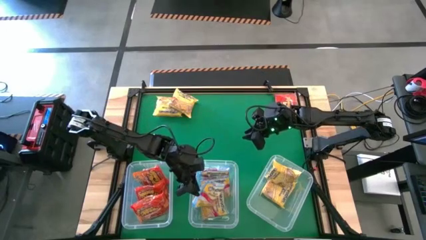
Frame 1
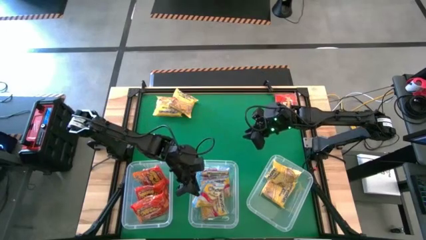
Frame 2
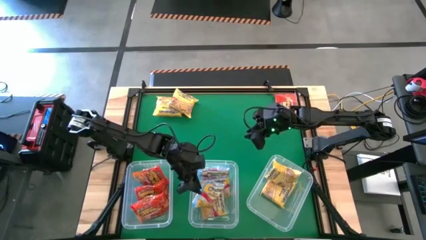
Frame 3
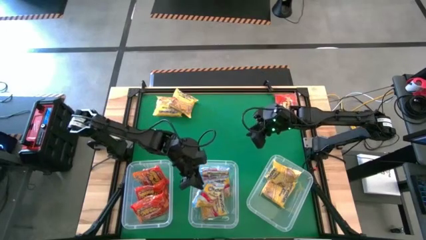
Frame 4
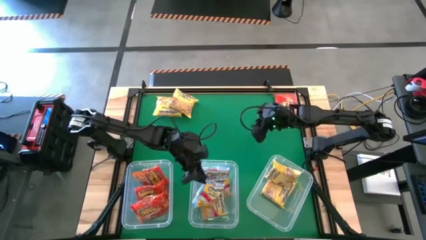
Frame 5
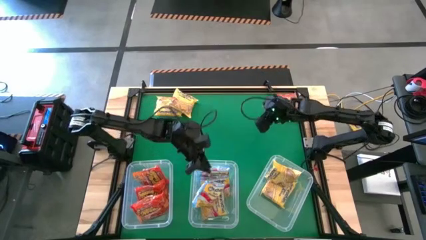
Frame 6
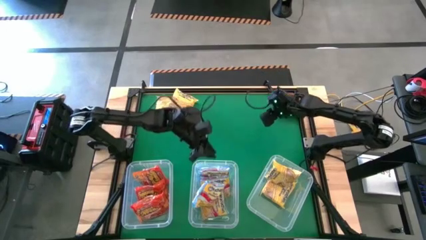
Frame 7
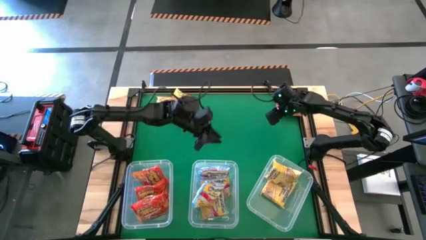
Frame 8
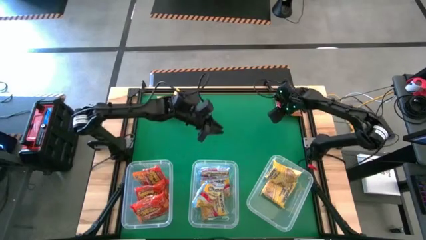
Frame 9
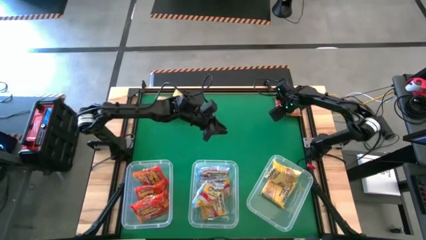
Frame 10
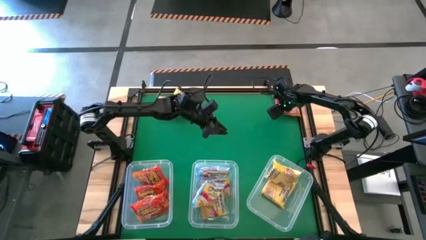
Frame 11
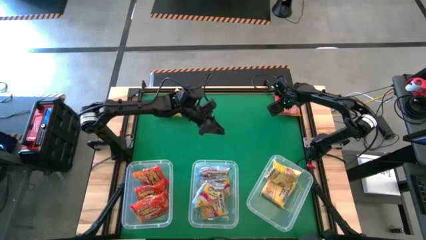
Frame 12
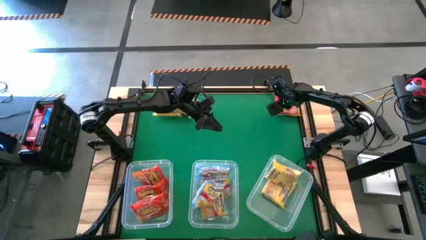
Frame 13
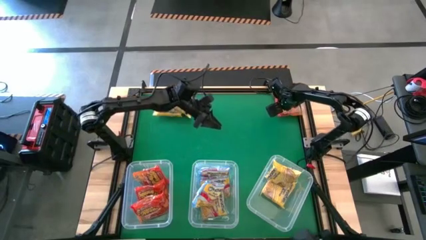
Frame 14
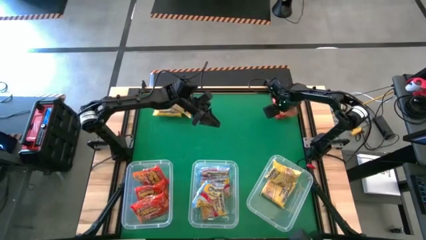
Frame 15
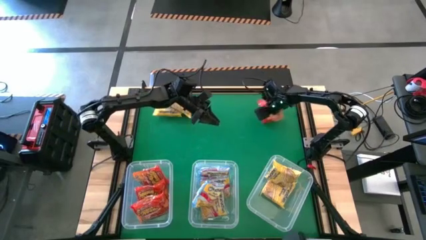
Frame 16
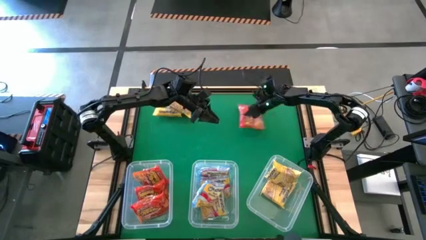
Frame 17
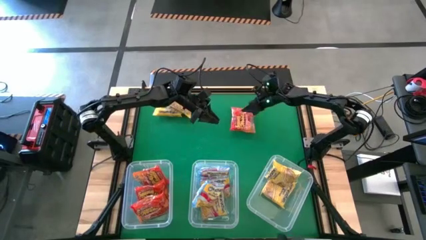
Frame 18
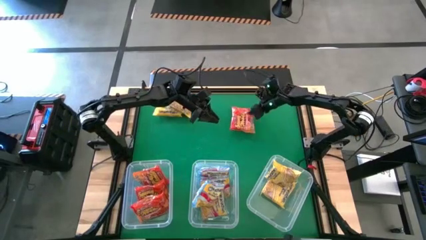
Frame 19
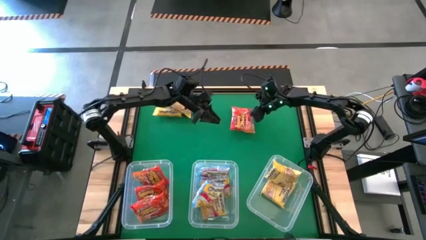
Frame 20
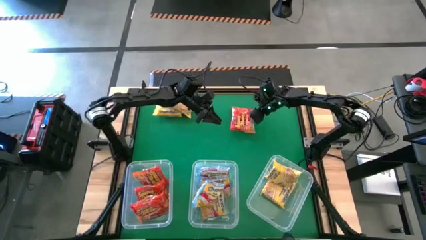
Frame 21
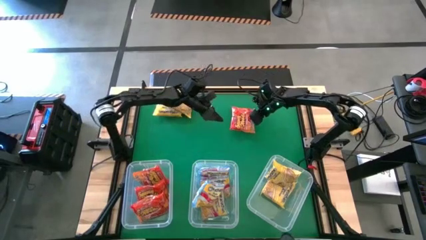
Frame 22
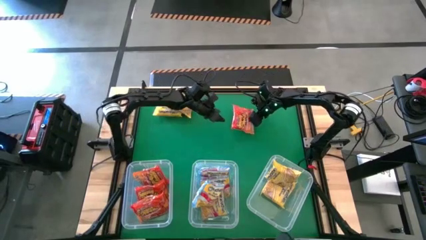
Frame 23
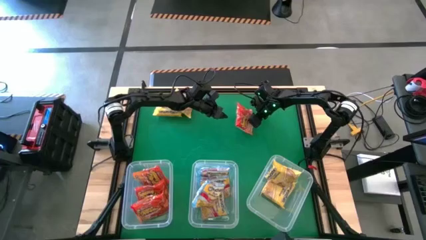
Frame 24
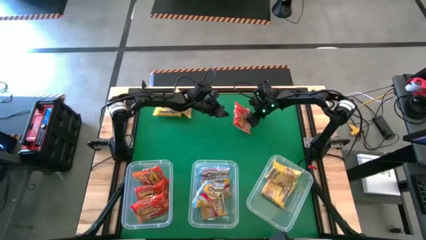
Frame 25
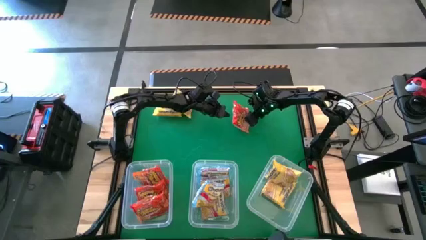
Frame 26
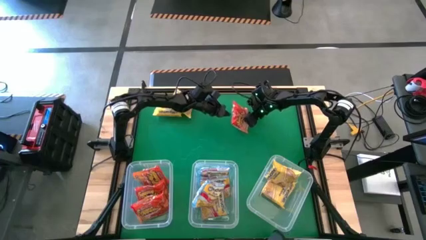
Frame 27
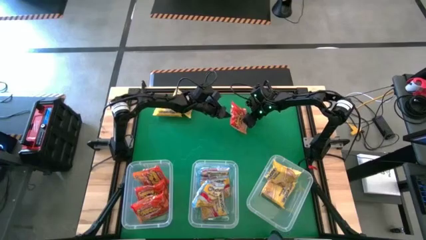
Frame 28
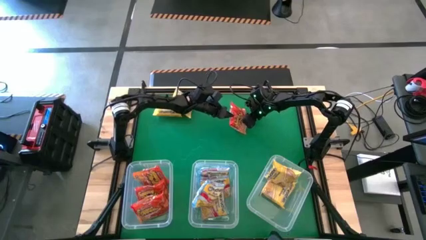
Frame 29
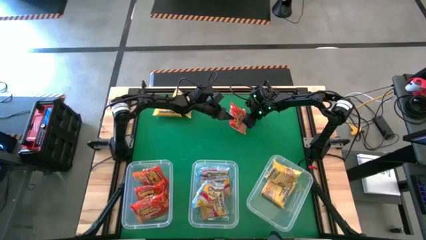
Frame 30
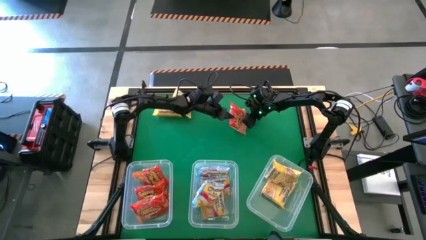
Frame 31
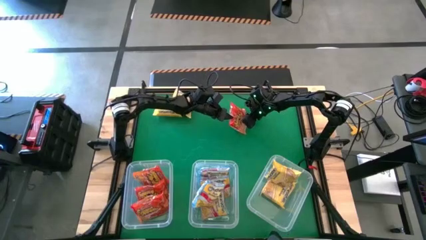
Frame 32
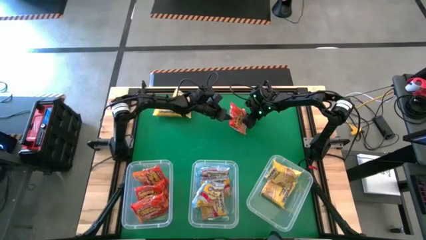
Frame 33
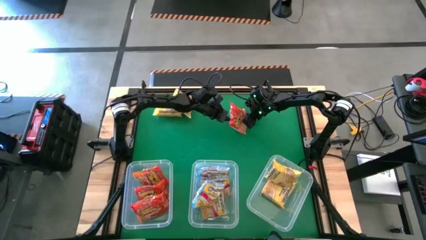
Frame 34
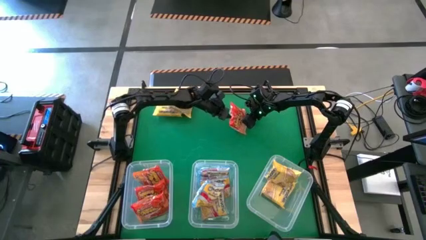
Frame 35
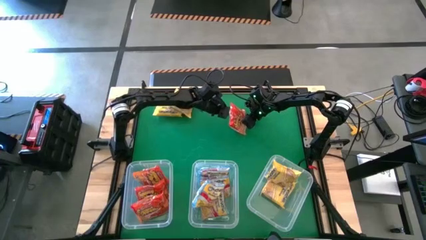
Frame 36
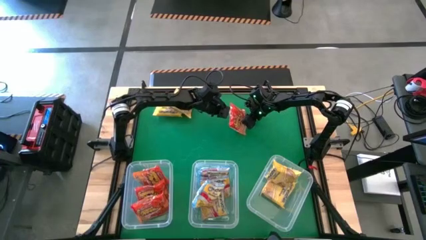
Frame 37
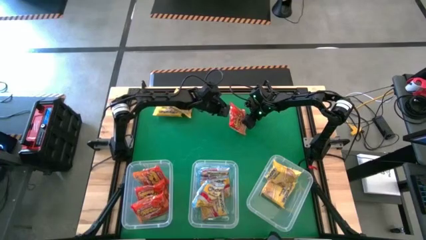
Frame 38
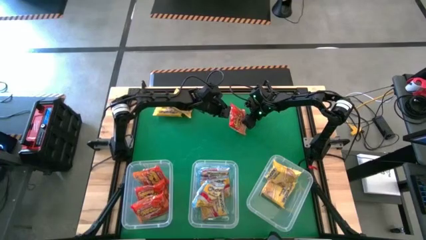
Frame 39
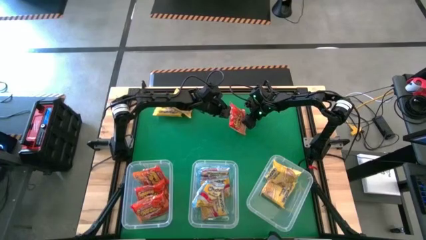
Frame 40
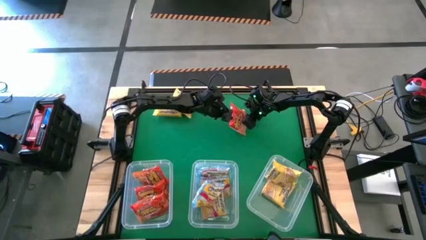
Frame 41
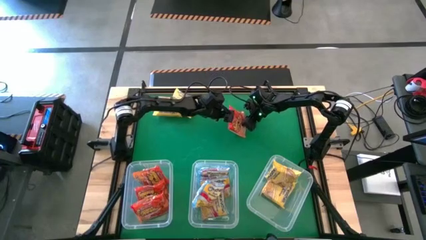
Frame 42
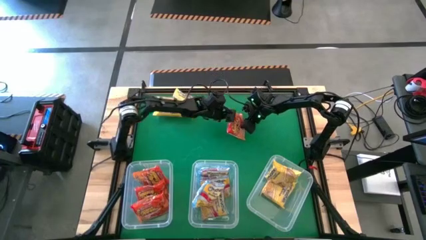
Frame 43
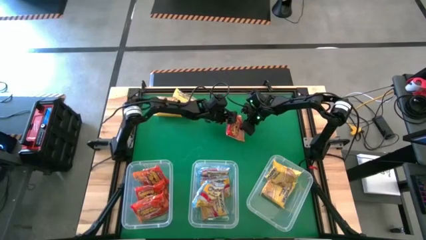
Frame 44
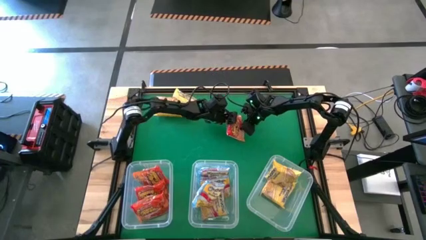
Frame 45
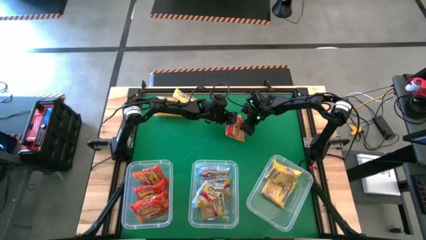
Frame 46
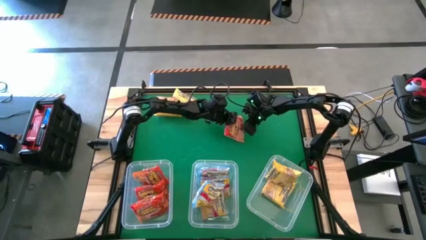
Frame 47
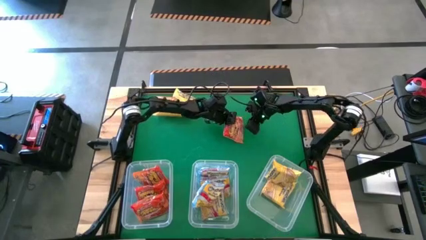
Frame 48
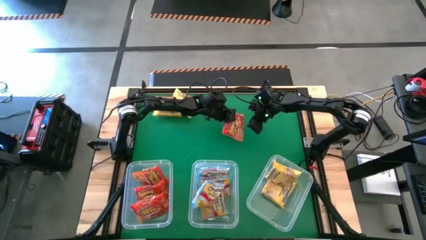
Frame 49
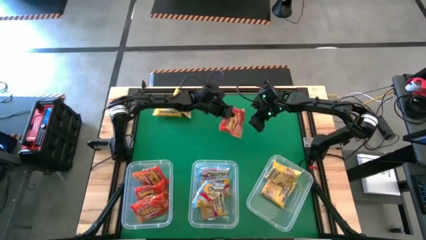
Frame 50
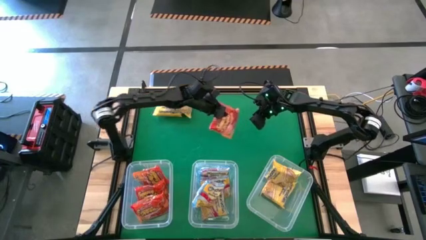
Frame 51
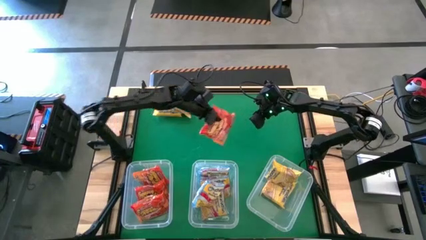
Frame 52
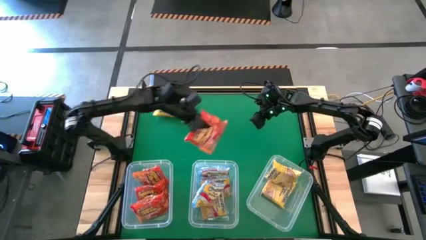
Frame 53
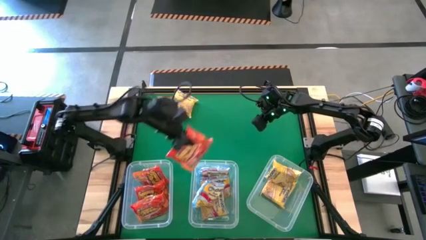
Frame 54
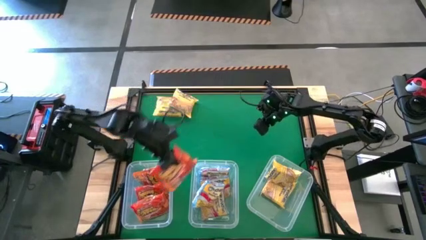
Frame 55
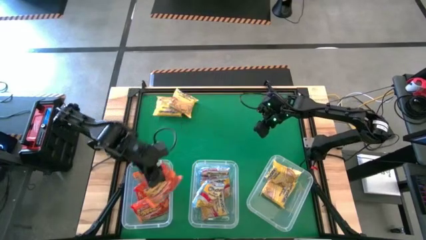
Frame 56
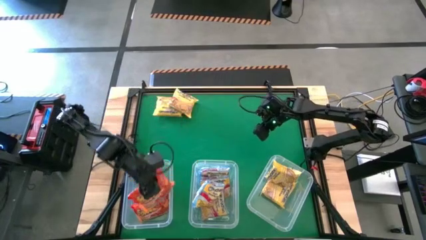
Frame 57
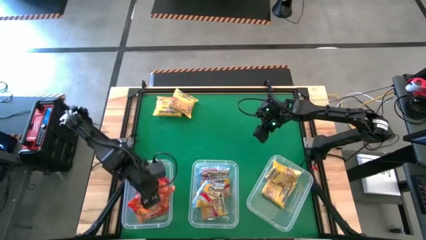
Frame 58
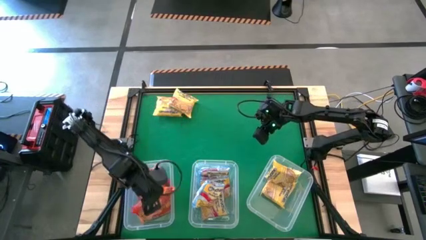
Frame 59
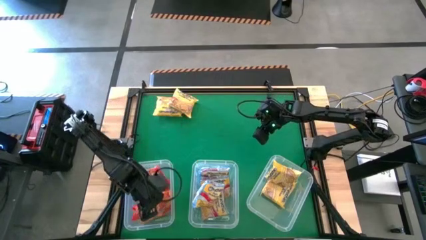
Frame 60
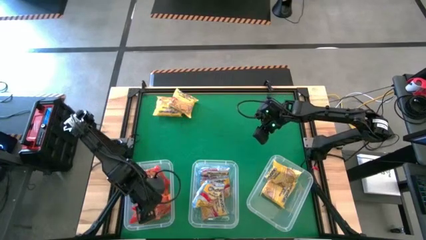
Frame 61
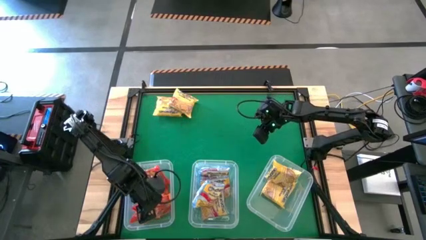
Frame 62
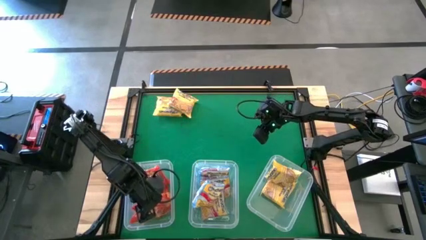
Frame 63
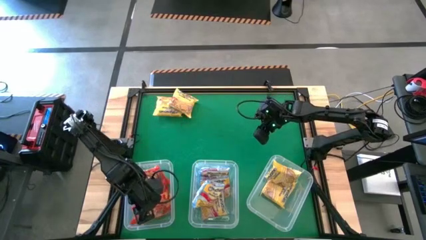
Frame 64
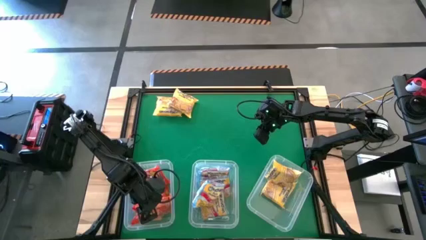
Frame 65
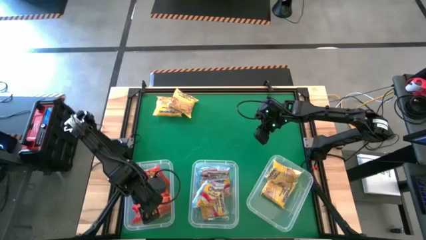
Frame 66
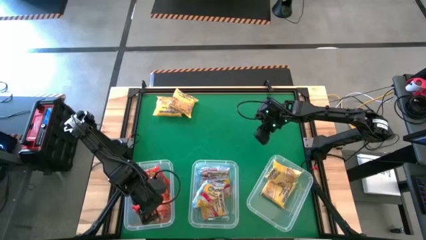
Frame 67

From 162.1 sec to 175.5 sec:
Task: Sort Maruchan noodles
Put the orange noodle pack into the left transparent bin
